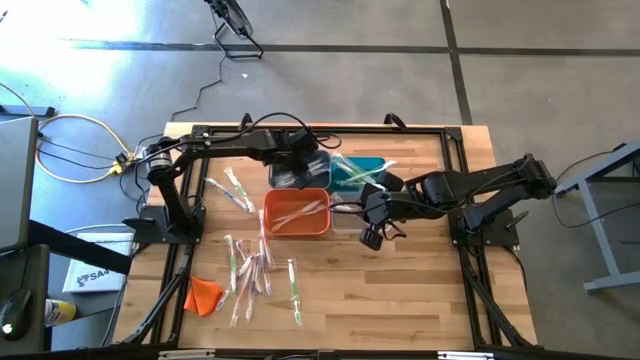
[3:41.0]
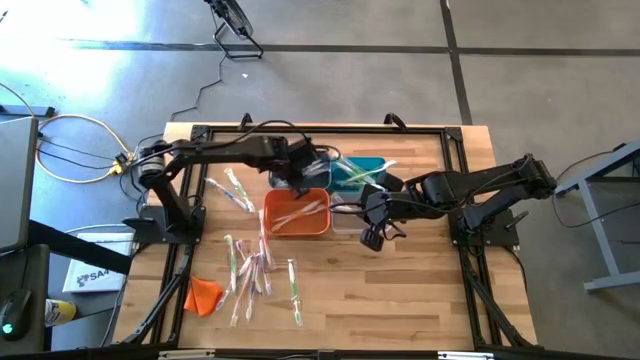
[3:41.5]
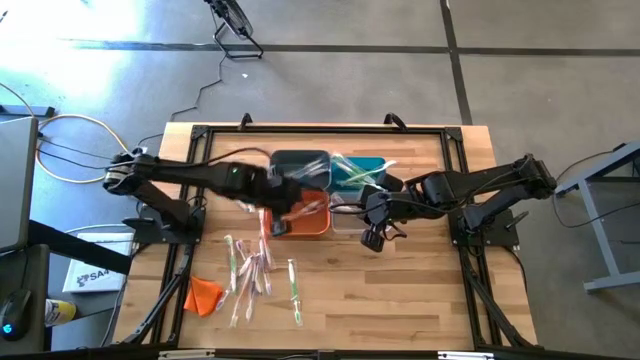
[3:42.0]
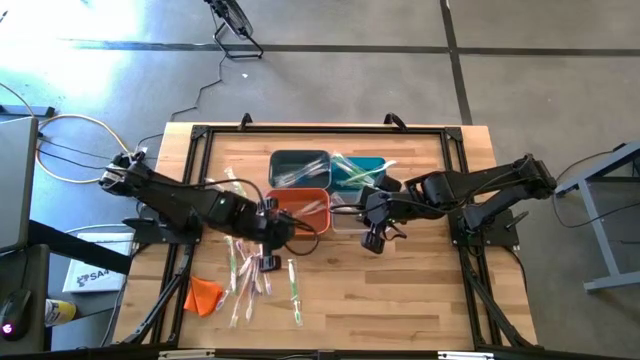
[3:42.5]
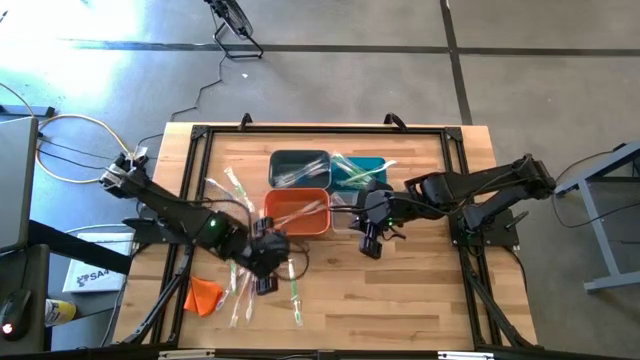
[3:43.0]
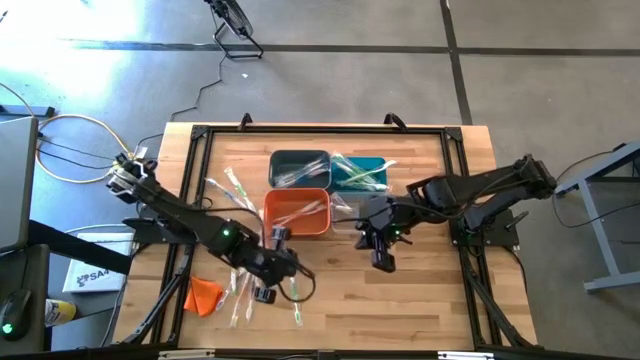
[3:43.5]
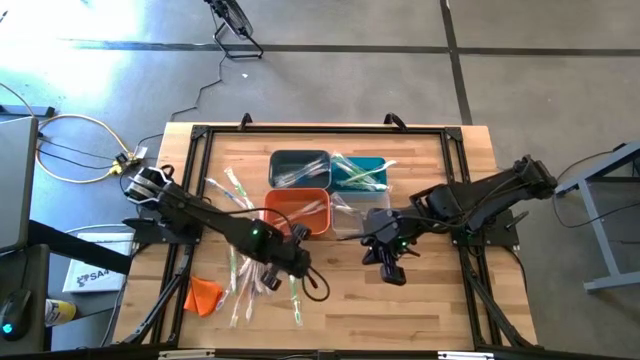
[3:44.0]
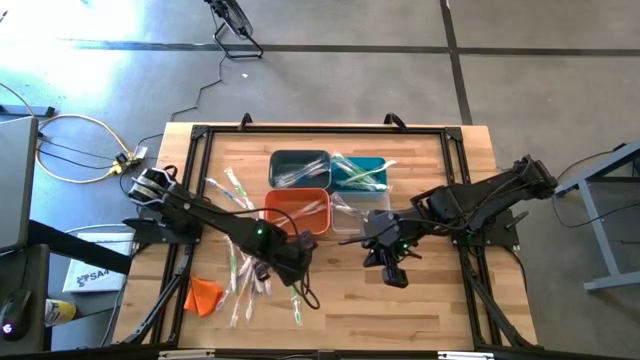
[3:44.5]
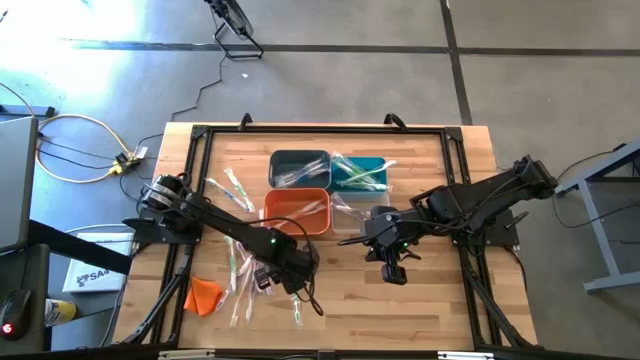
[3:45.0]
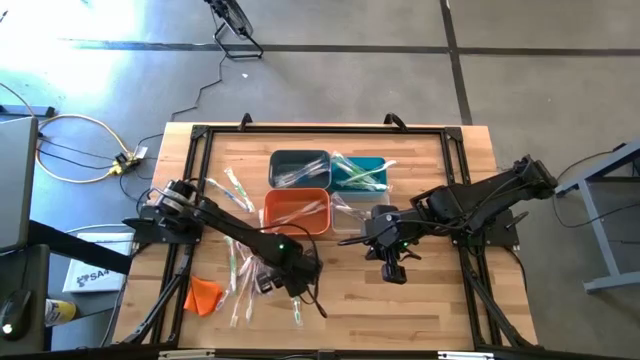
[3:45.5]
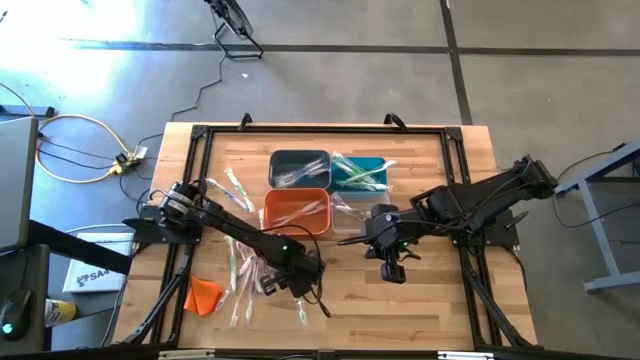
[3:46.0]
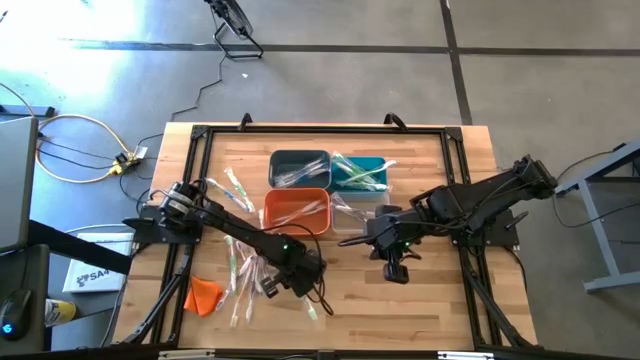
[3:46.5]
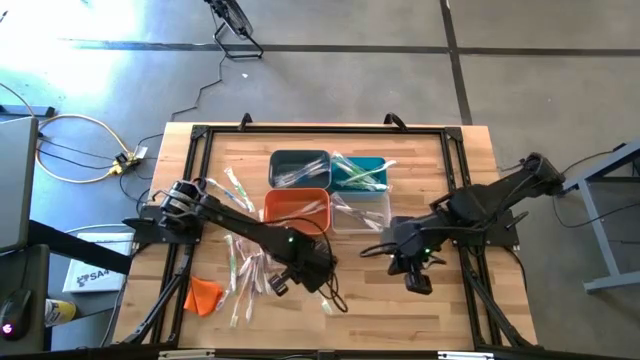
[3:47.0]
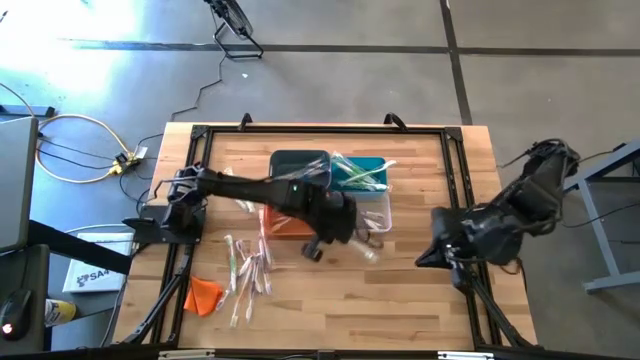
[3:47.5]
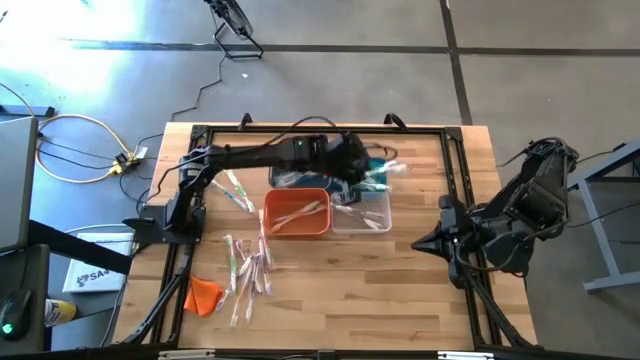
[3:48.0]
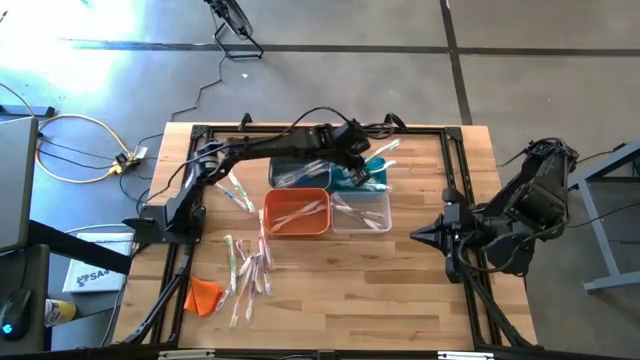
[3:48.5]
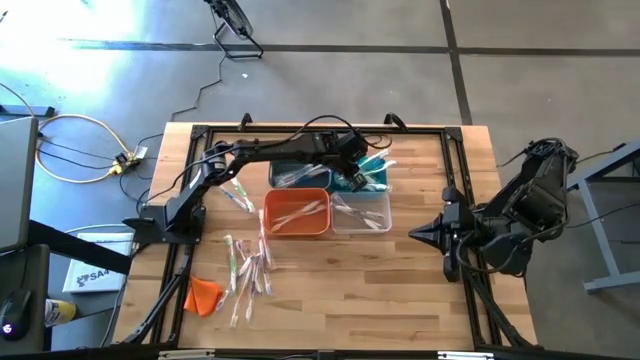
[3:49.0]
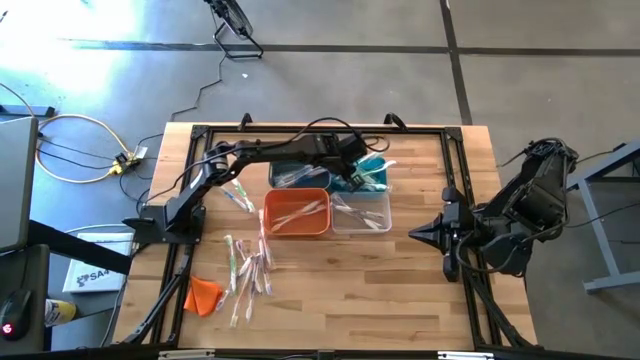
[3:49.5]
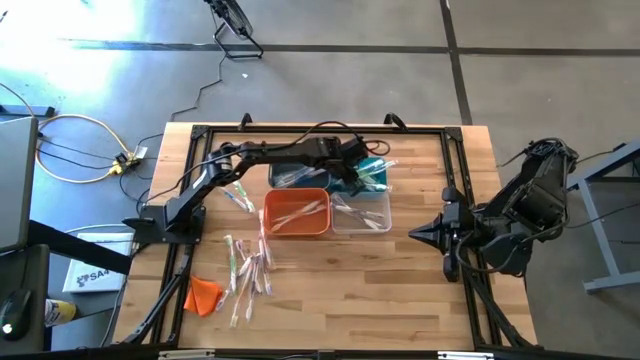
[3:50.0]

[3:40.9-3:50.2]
Task: Pick & Place Toothbrushes
Put the green toothbrush into the right blue bin

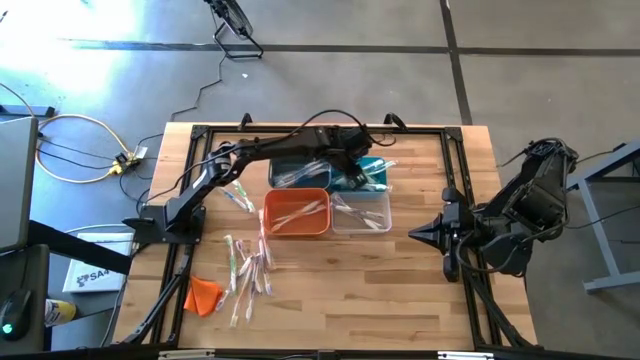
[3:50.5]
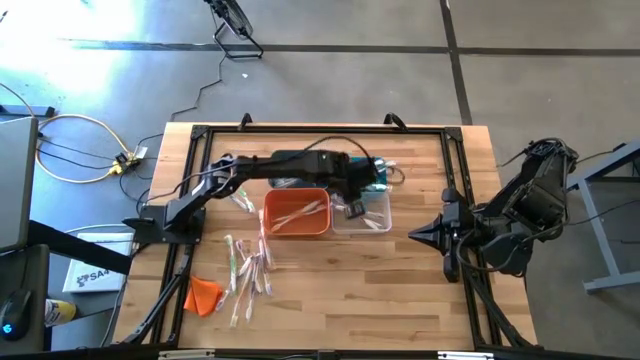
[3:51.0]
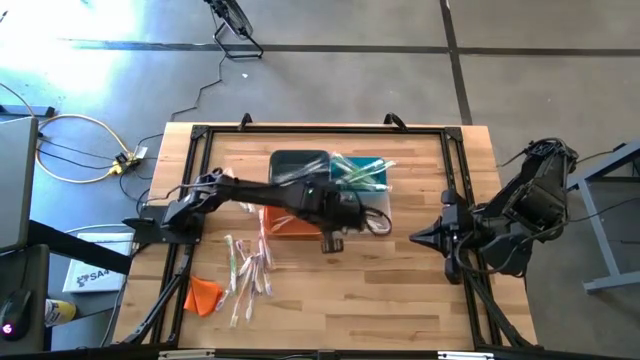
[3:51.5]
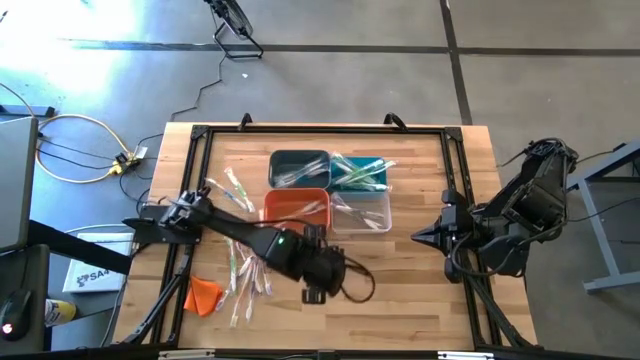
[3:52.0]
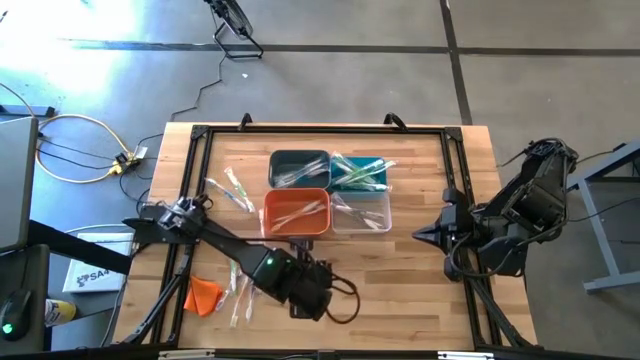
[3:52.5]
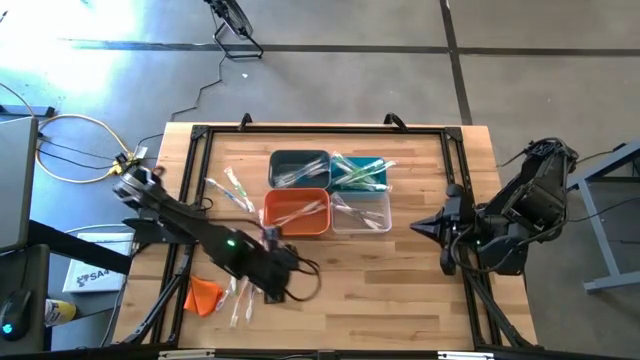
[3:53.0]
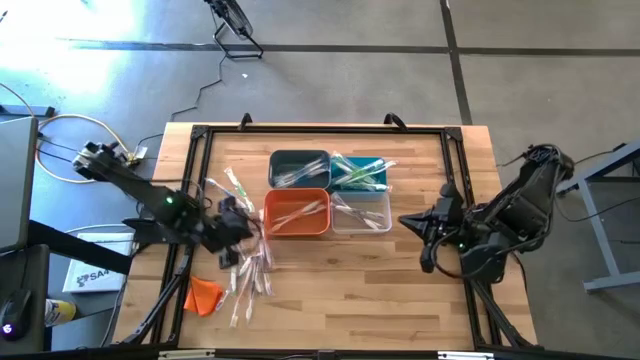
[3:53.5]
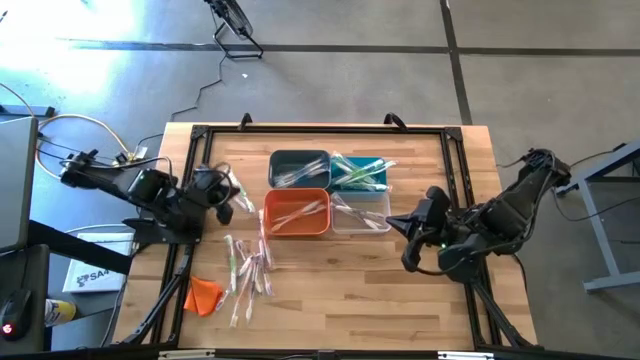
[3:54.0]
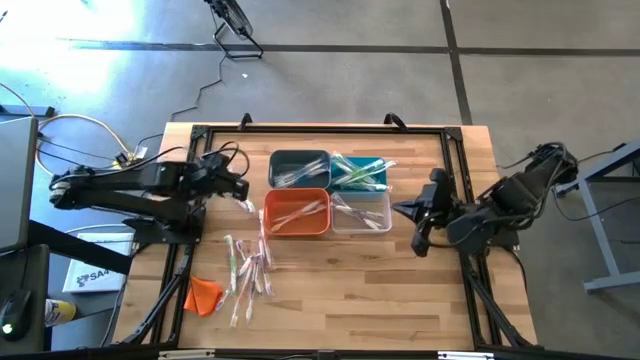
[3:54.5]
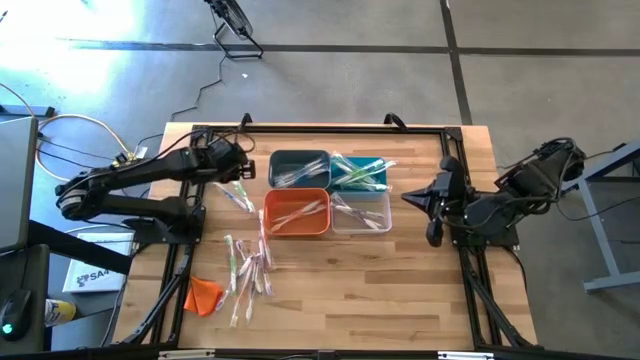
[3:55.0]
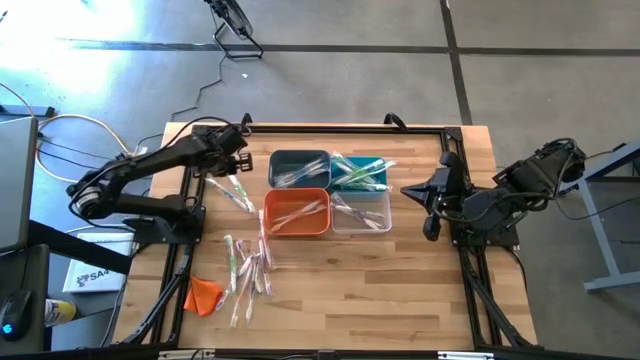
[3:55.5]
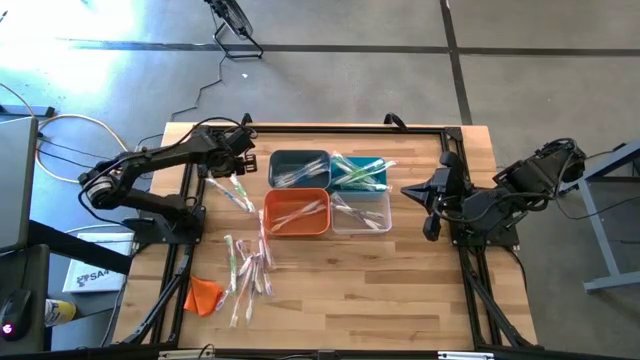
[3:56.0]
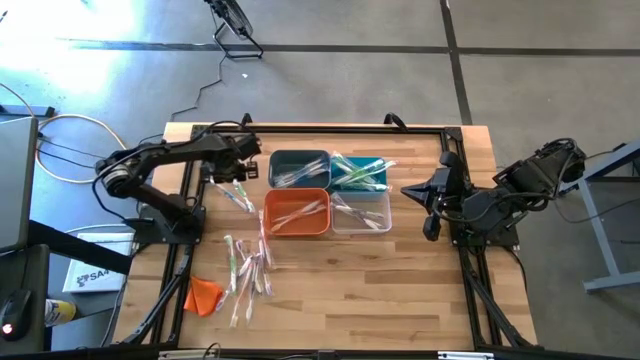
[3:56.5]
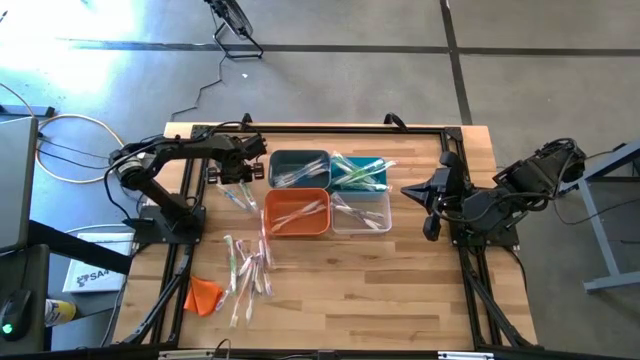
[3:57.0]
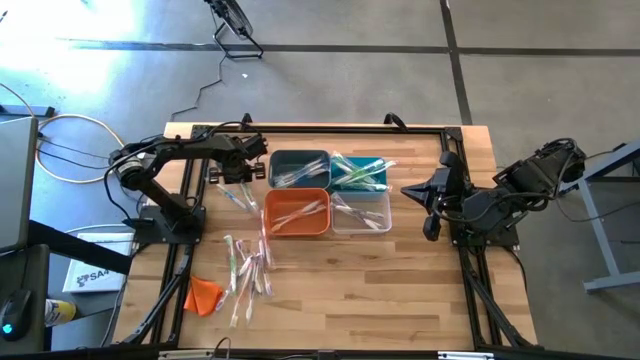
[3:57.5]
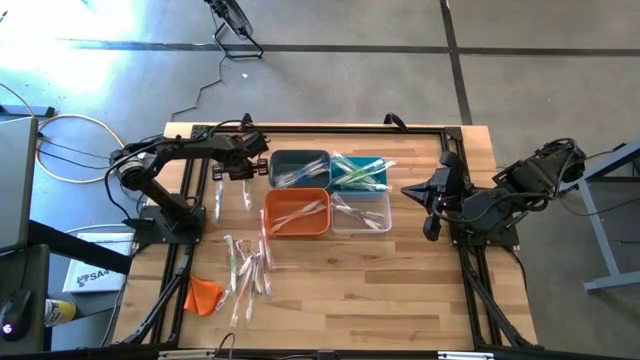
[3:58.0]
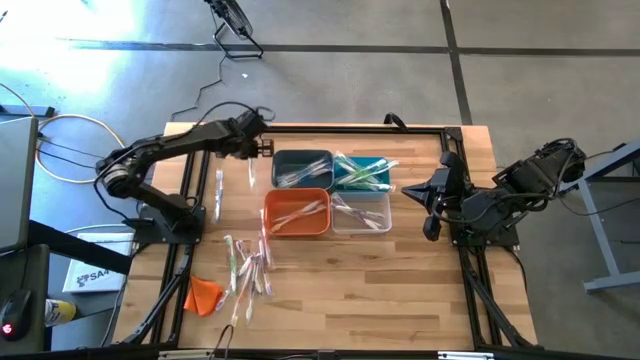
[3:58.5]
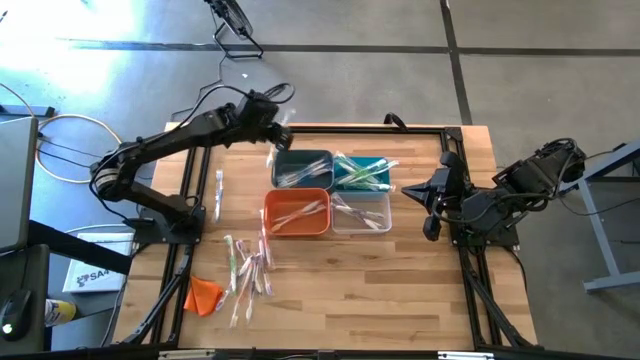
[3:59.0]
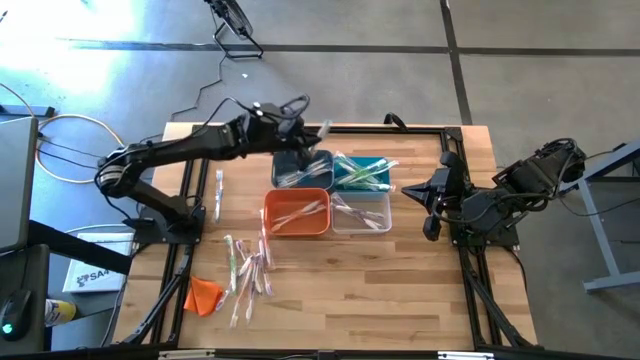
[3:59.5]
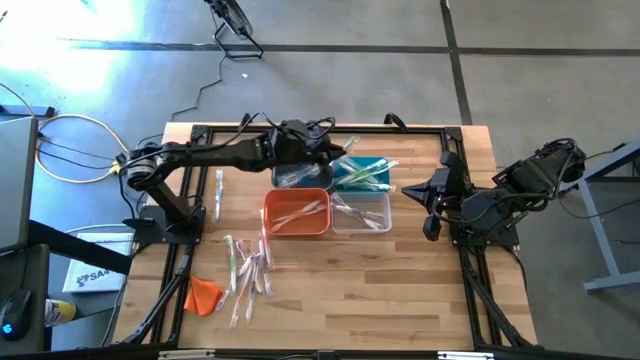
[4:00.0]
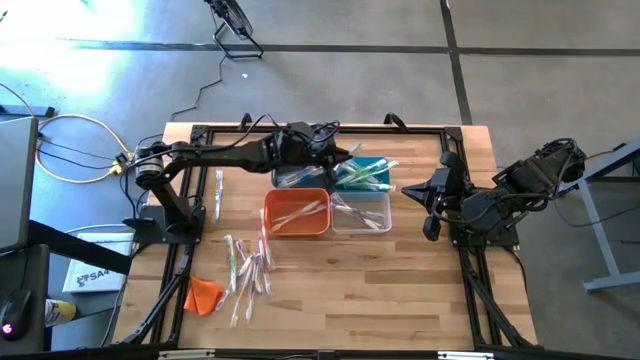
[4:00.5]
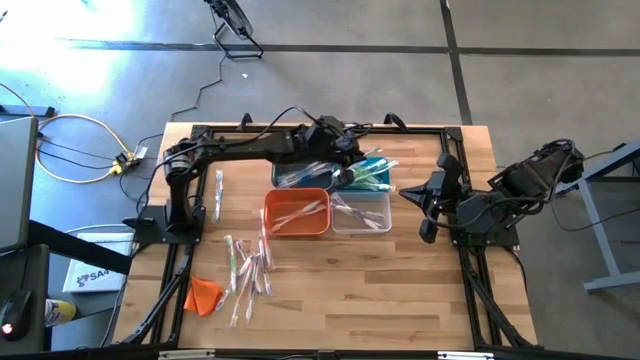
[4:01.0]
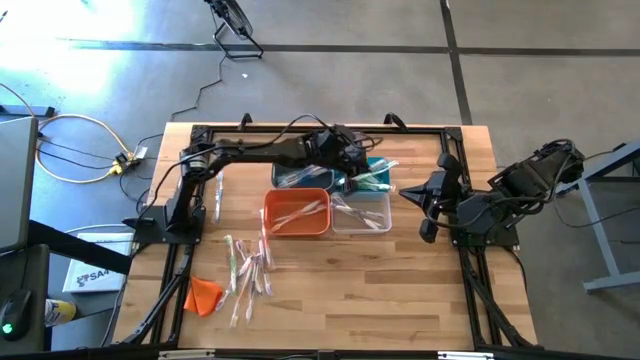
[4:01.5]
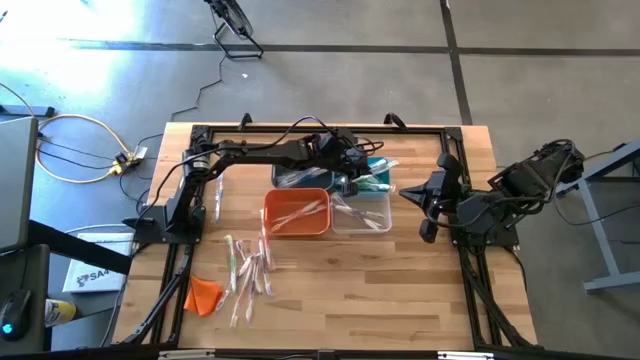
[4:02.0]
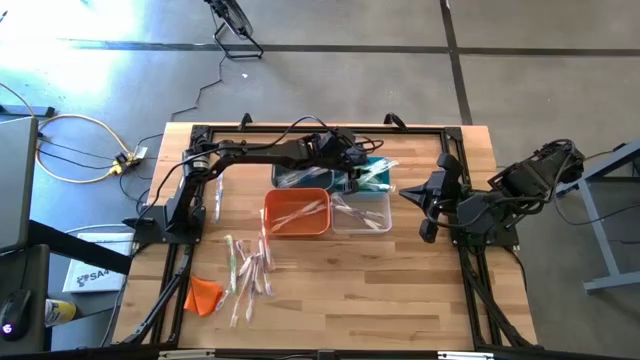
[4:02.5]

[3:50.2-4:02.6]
Put the green toothbrush into the right blue bin
